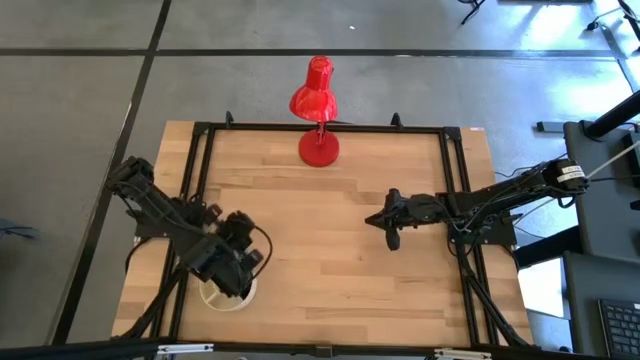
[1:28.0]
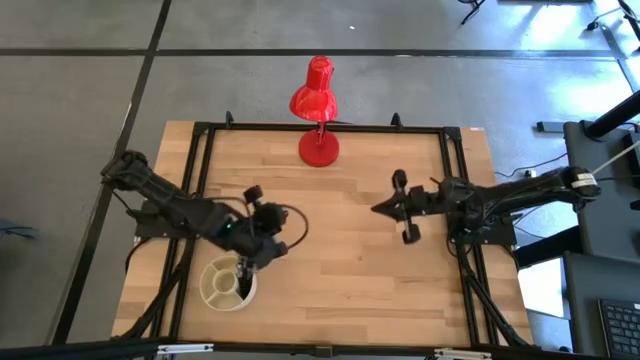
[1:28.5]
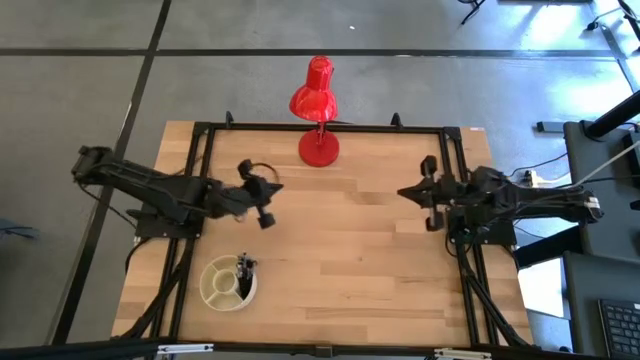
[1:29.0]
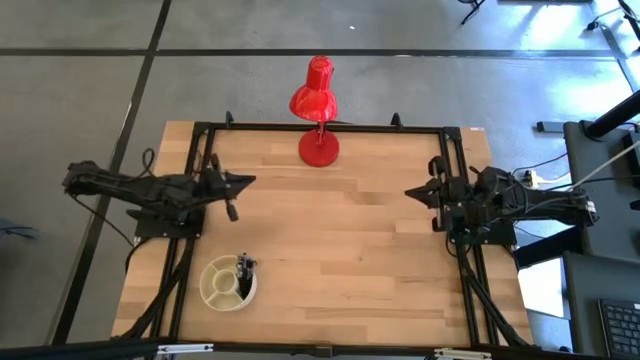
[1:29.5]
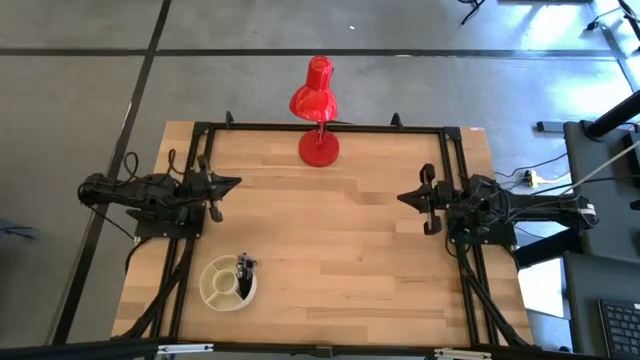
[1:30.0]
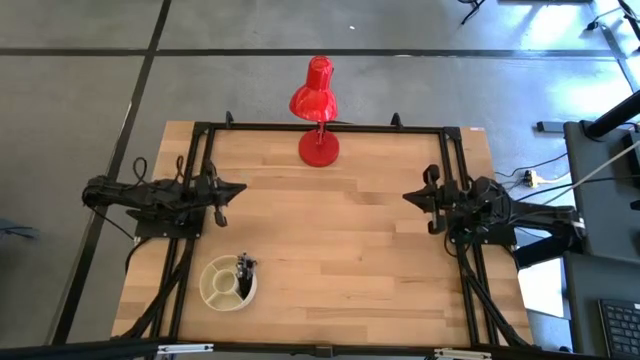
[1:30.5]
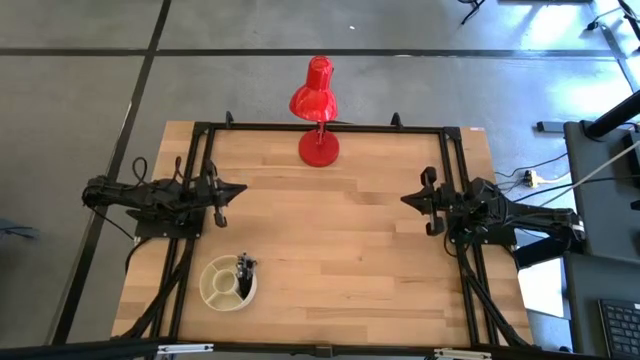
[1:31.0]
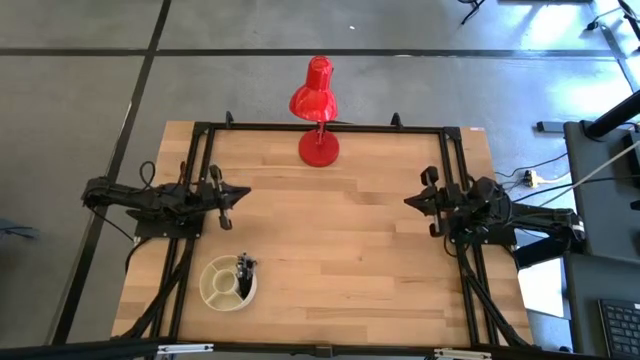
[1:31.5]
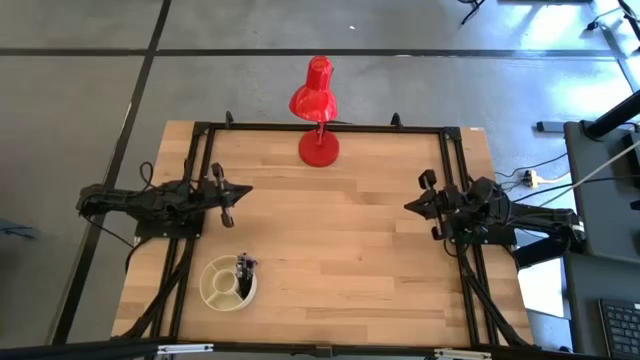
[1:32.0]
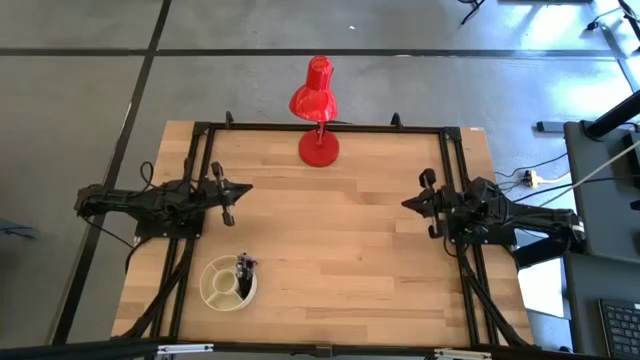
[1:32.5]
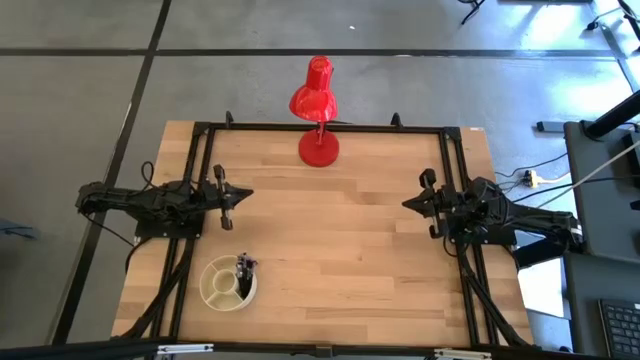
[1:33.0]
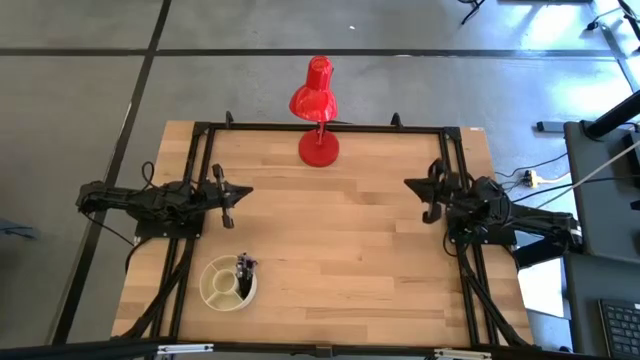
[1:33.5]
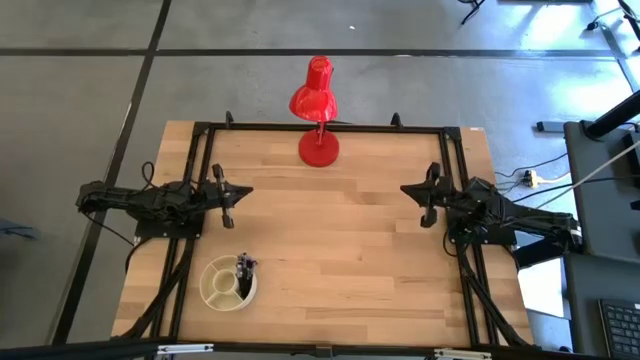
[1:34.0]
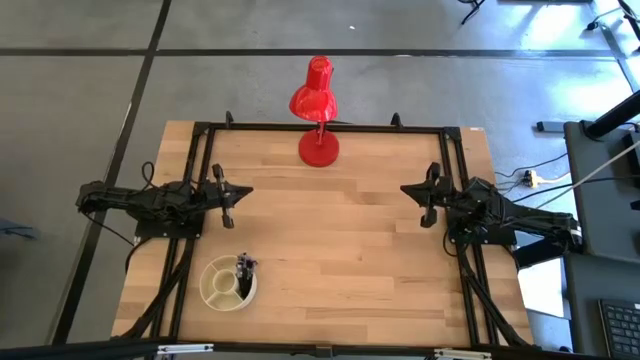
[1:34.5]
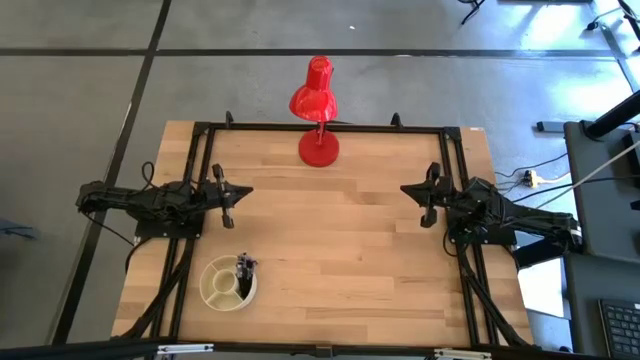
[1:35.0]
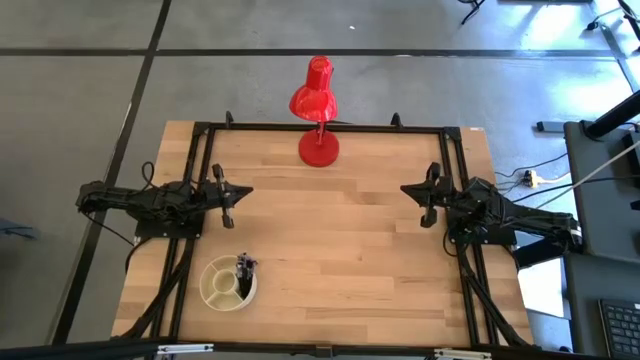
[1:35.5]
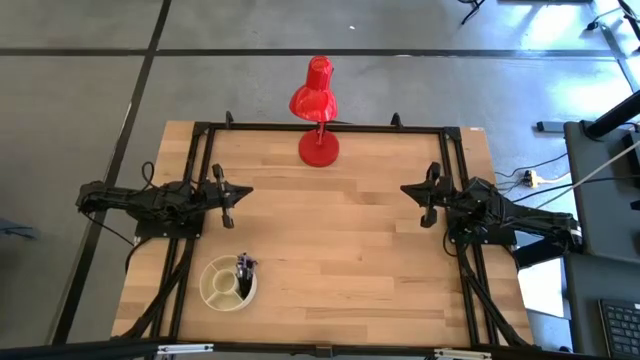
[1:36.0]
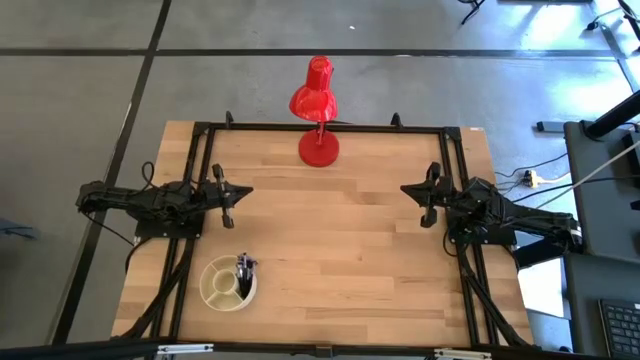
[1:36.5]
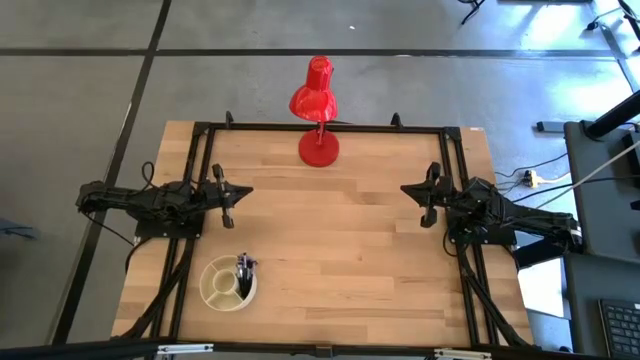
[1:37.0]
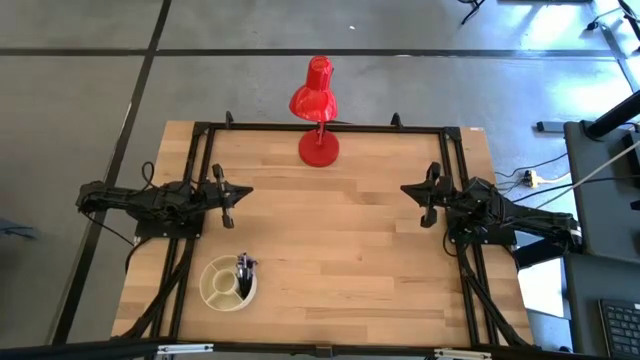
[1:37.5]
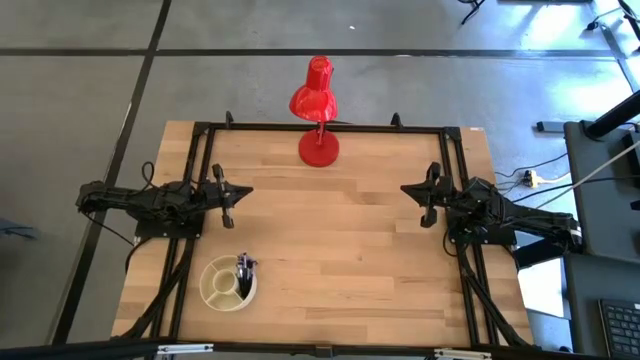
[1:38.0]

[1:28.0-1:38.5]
Task: Put items in baskets/containers
Return to Home Position

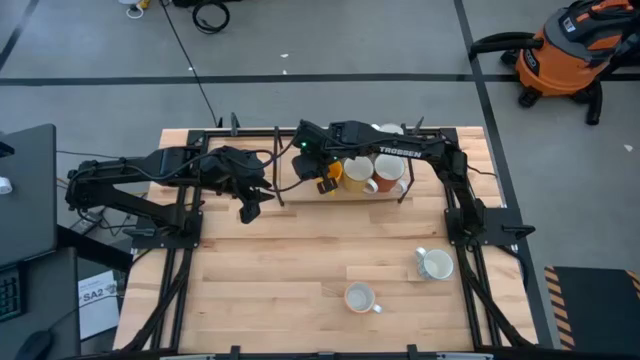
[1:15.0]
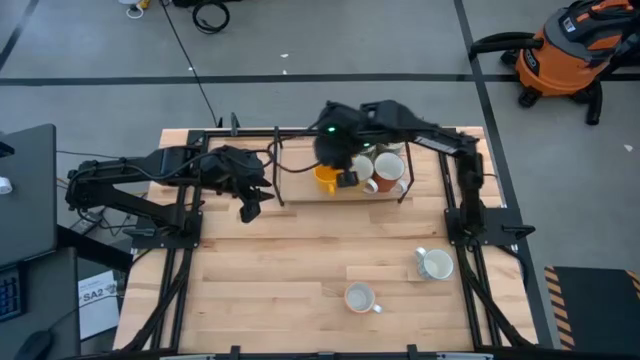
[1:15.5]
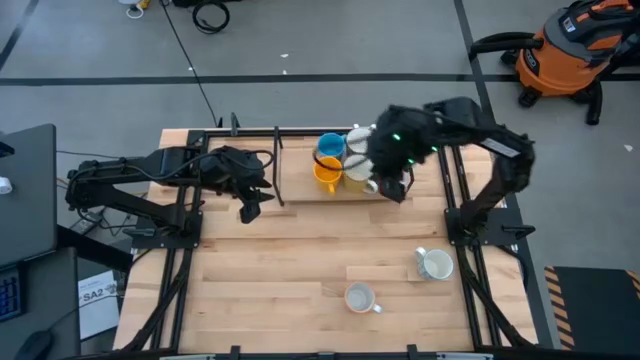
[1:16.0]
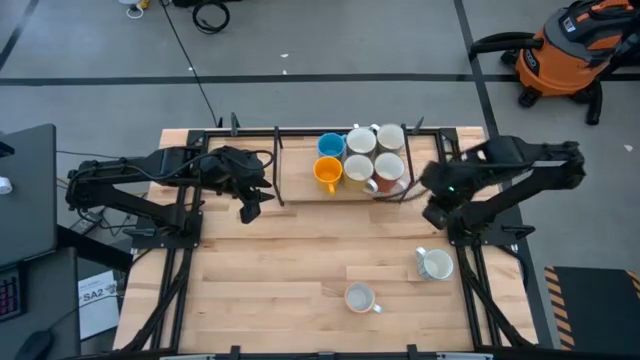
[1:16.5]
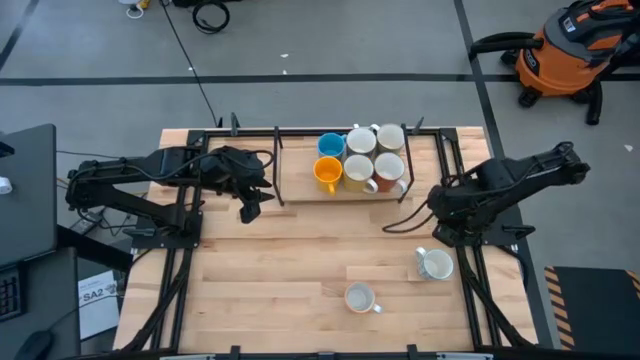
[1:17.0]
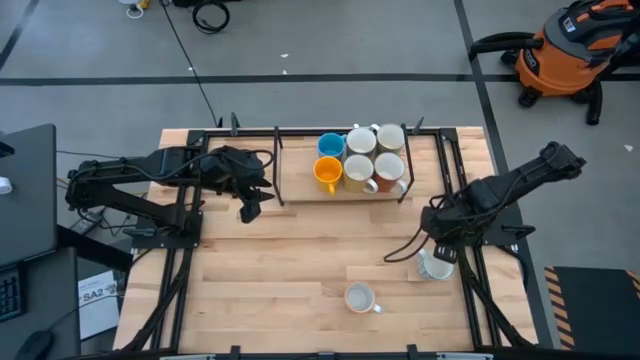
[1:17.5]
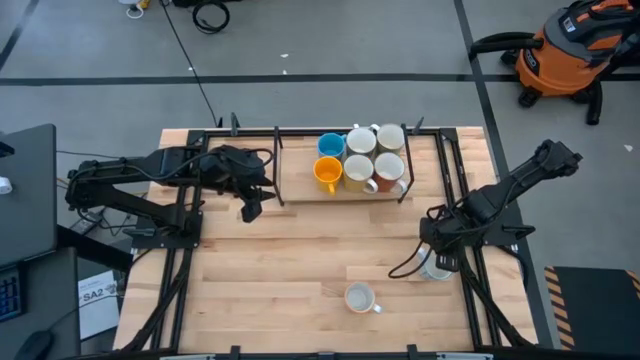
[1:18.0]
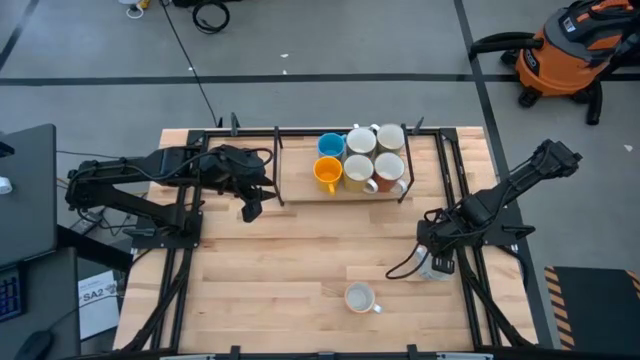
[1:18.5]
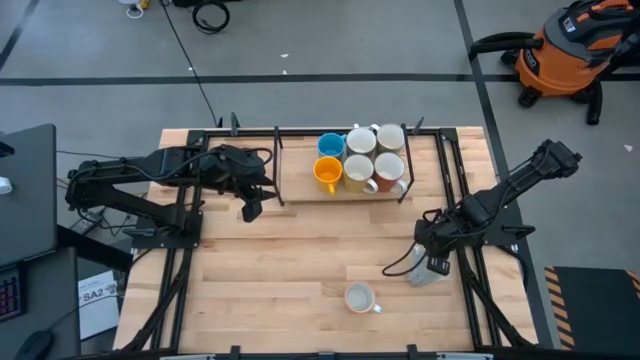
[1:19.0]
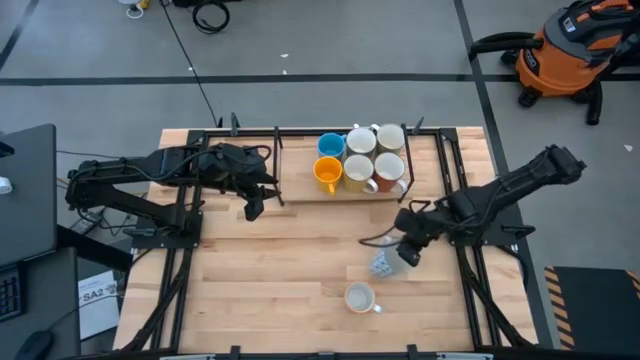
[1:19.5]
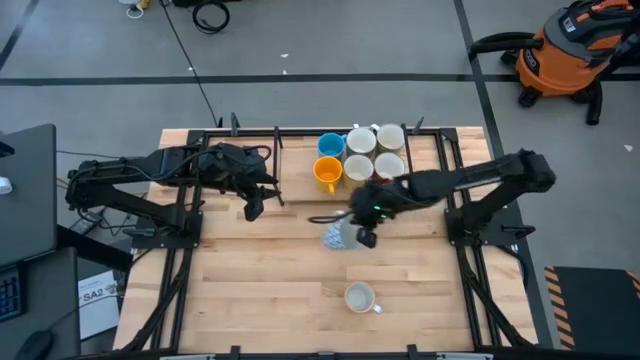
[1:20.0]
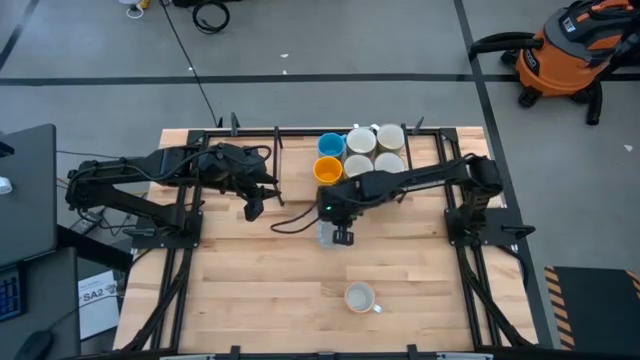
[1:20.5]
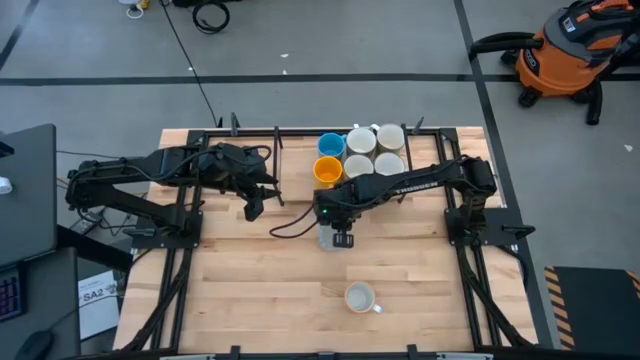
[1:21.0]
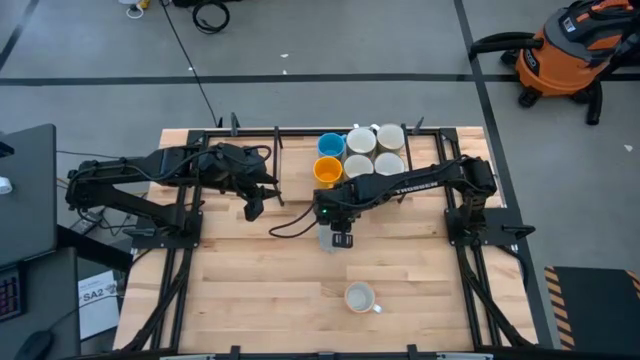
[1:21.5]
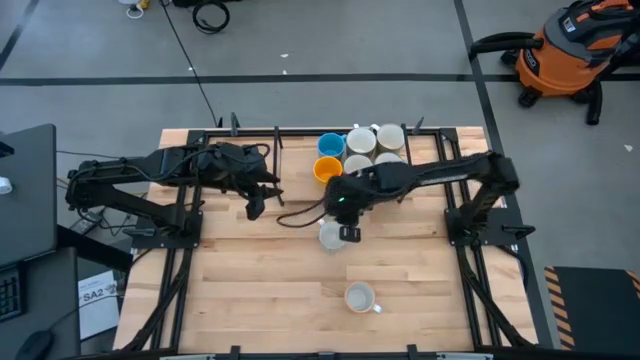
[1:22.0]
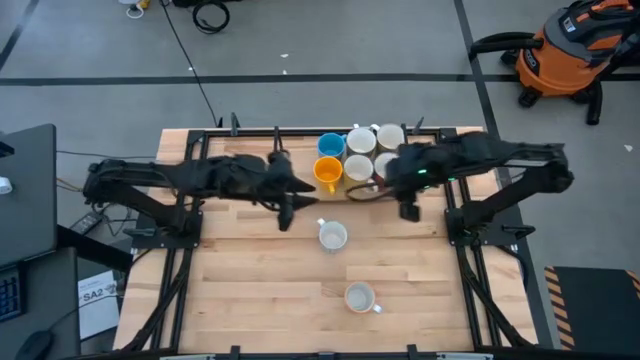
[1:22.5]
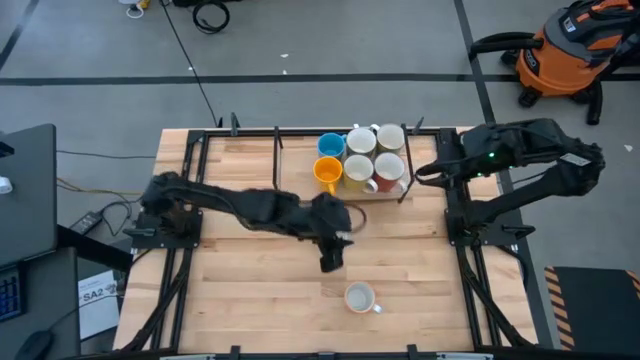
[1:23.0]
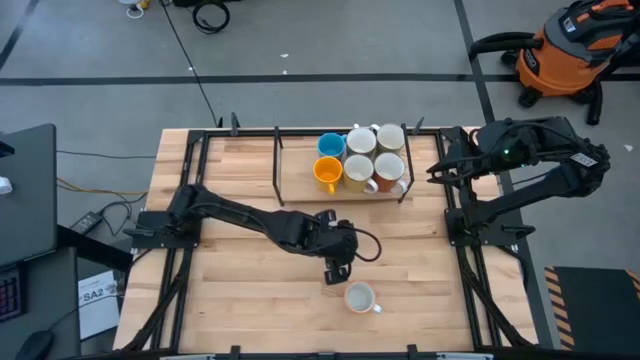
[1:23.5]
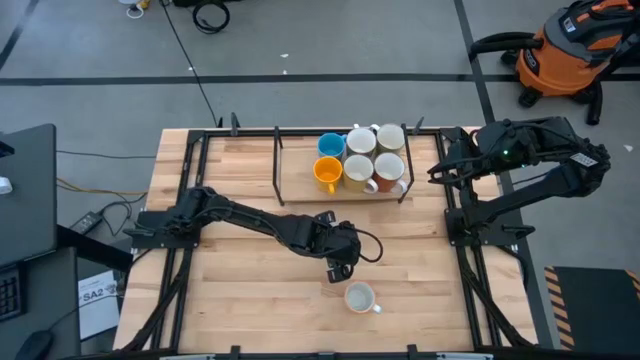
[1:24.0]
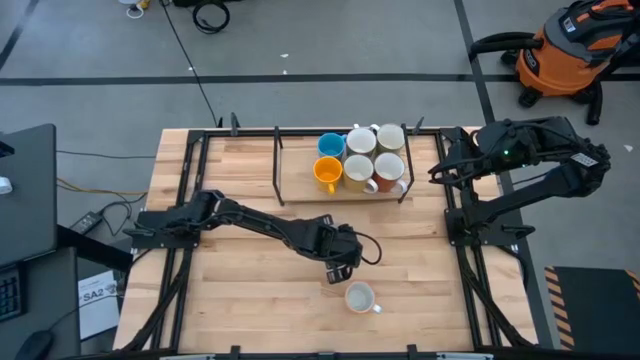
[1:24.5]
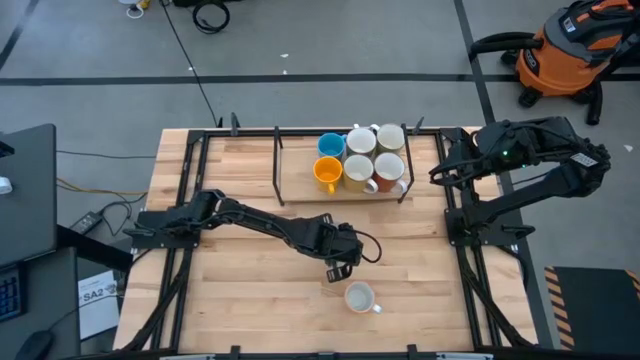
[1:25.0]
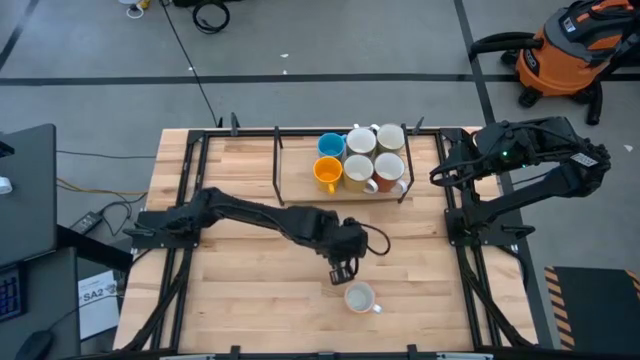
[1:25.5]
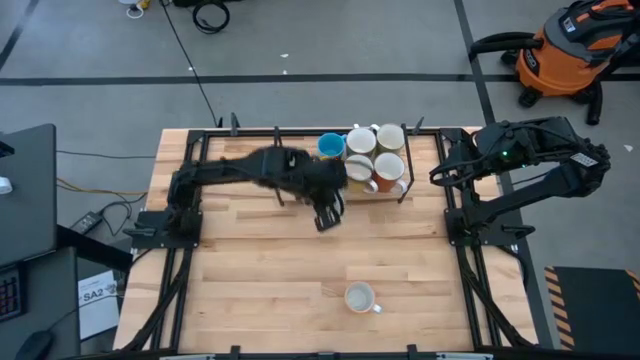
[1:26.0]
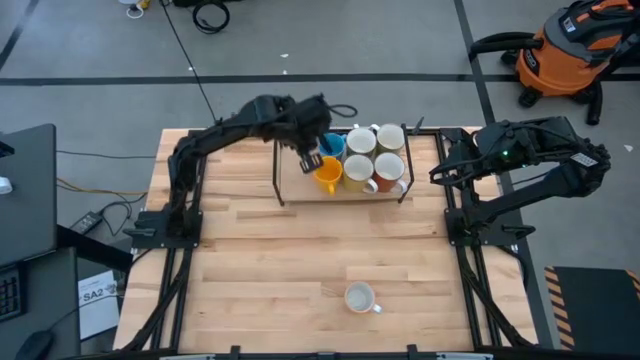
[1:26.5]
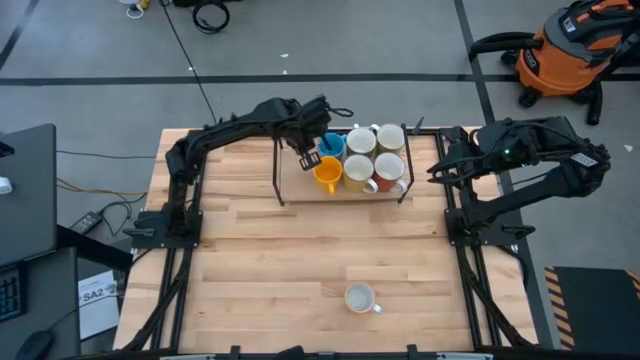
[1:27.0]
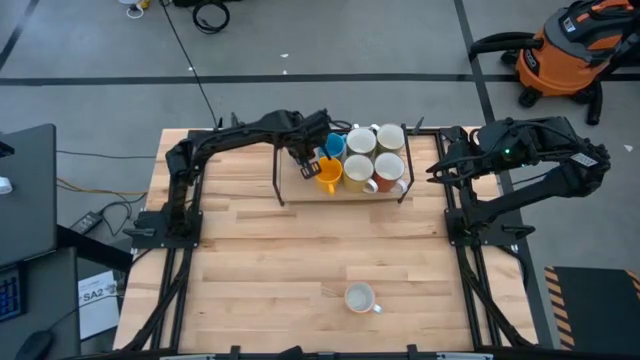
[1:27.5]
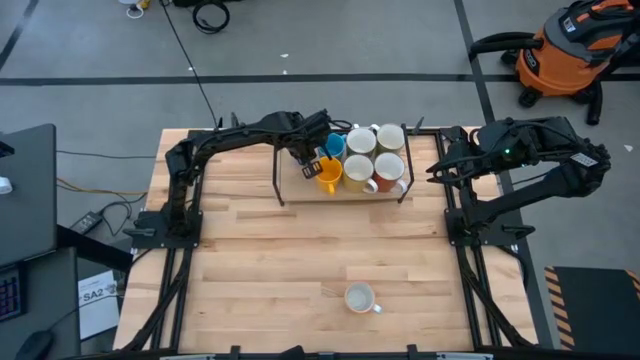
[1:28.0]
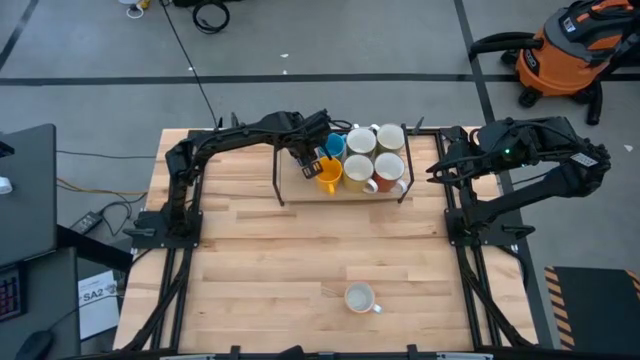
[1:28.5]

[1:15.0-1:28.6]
Task: Place coffee mugs
Put the blue cup on the shelf
